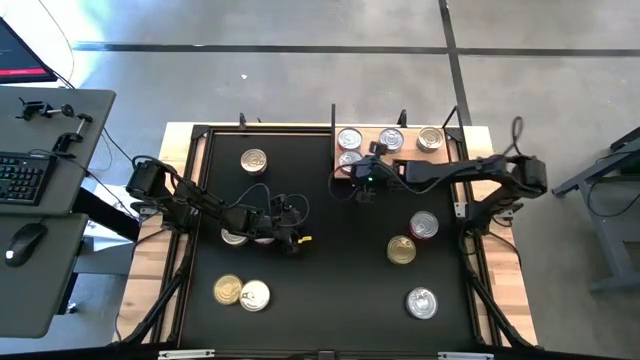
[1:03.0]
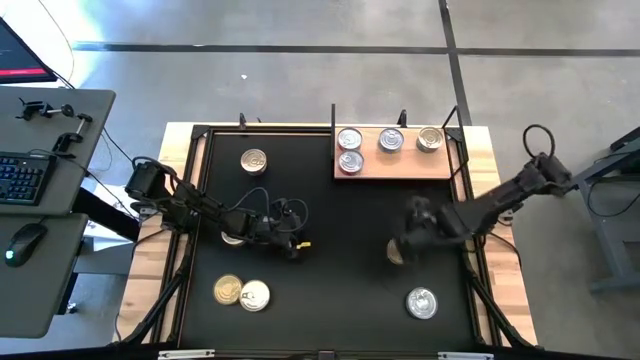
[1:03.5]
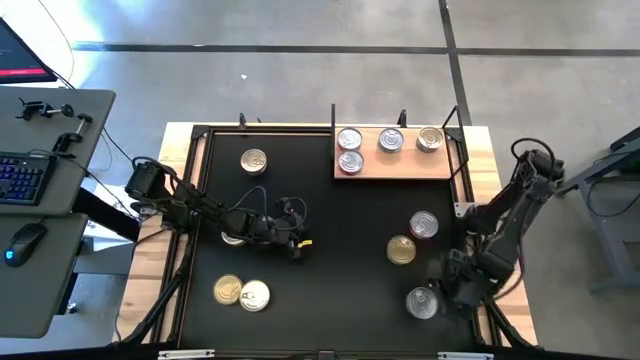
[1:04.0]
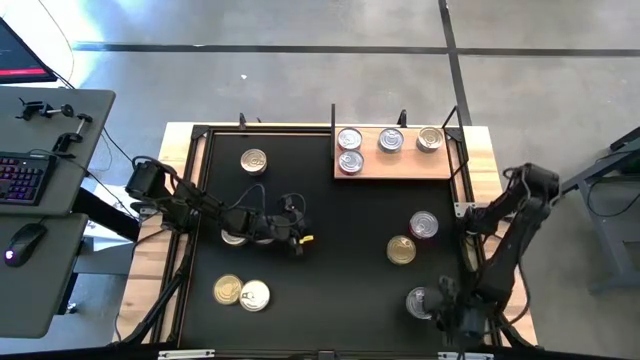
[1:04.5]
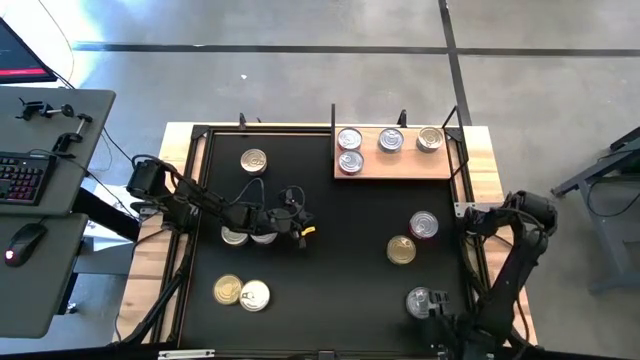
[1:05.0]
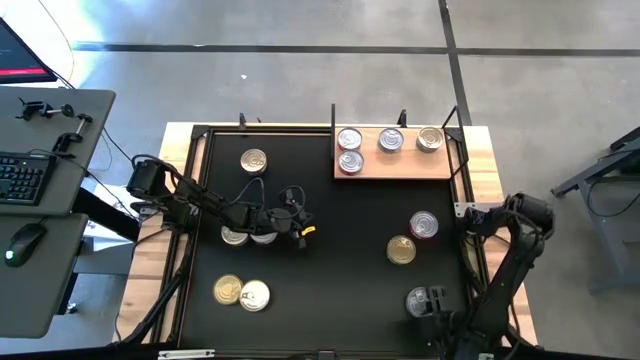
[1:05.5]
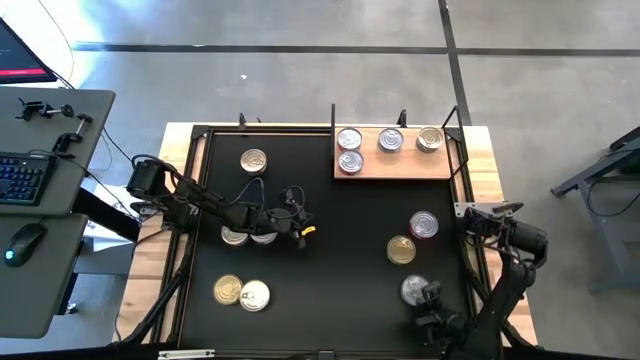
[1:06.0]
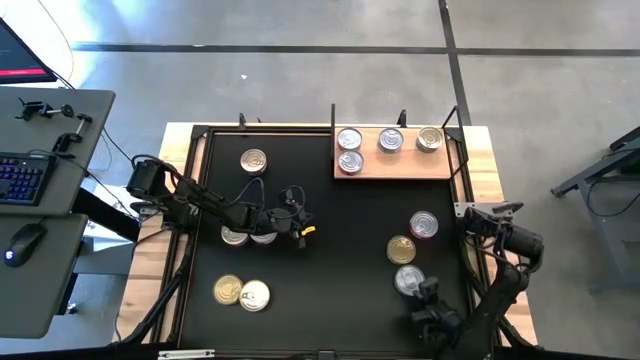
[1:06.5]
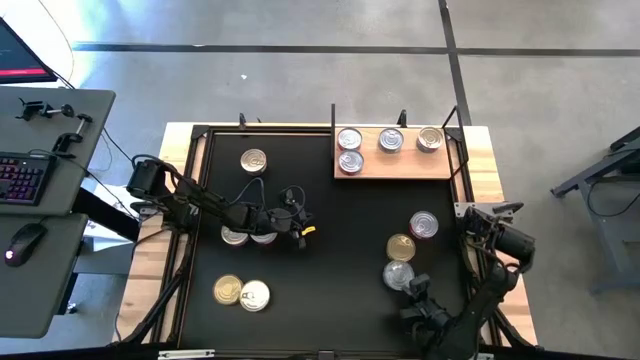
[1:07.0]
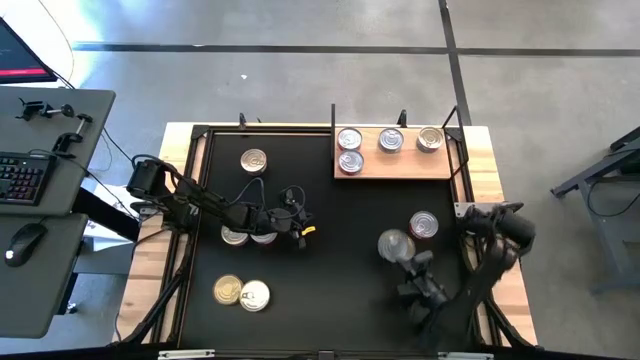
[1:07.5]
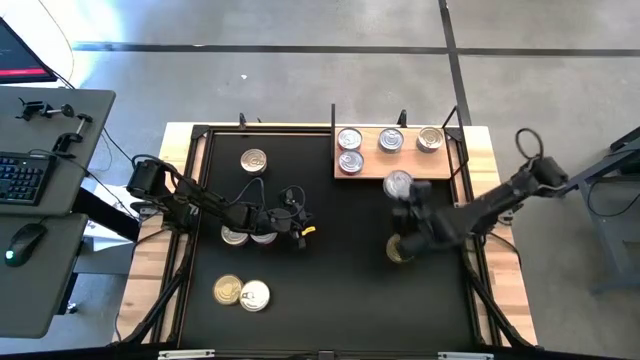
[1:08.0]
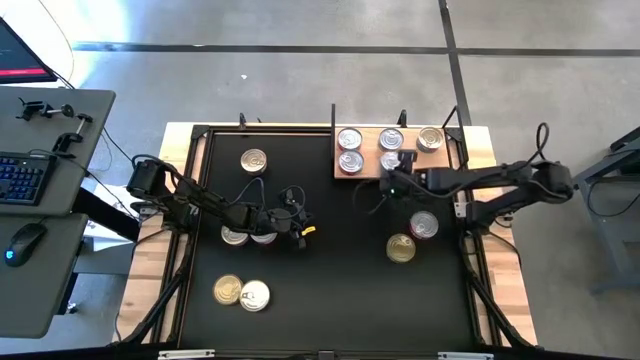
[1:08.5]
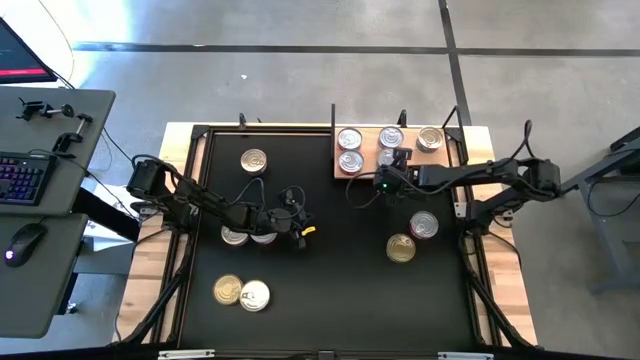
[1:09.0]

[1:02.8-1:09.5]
Task: Stack canned seafood by type on shelf
Put the green tuna can aligned with the other green tuna can

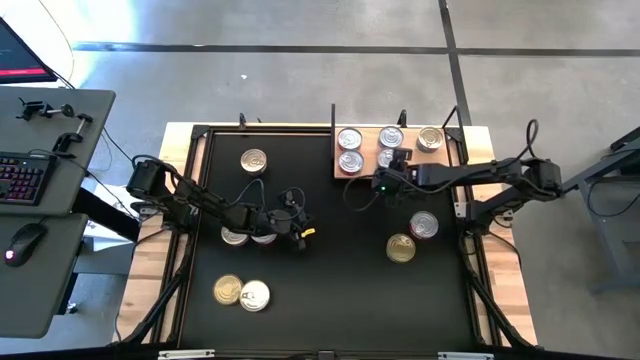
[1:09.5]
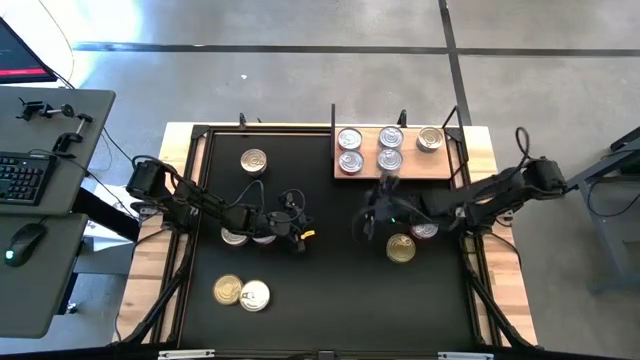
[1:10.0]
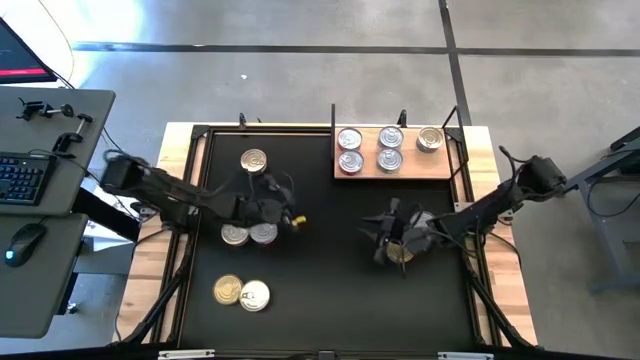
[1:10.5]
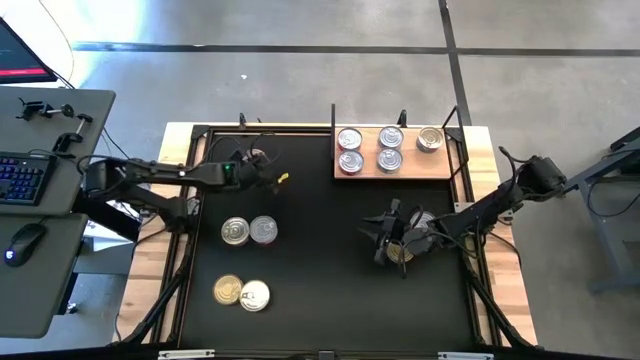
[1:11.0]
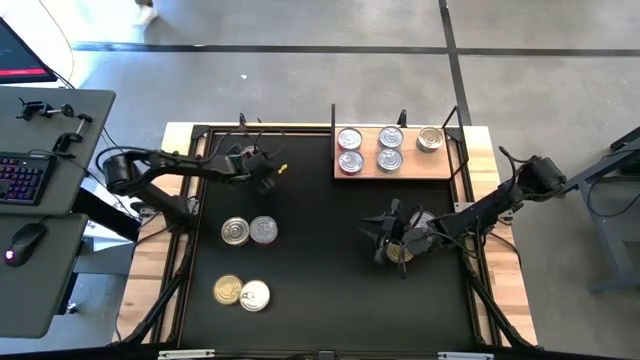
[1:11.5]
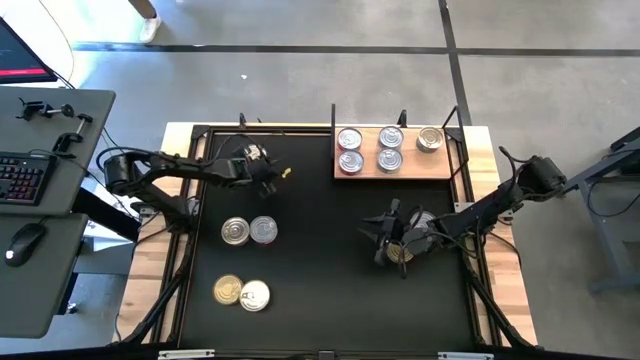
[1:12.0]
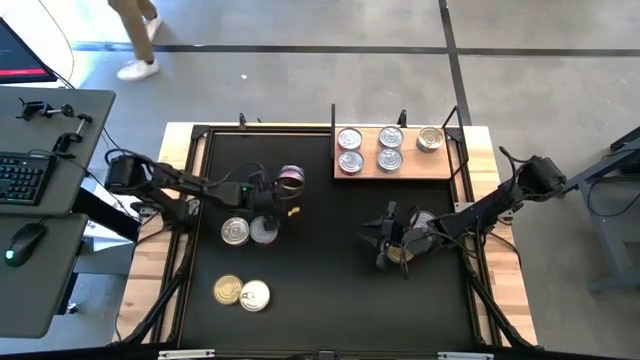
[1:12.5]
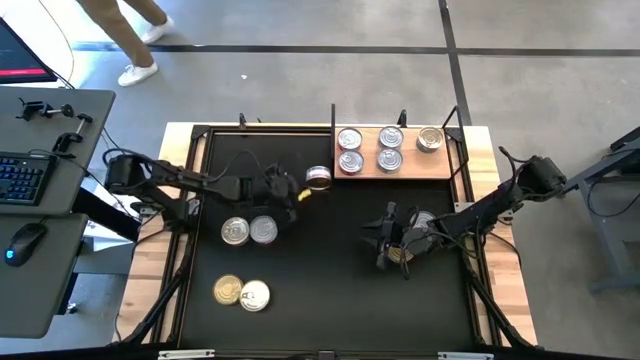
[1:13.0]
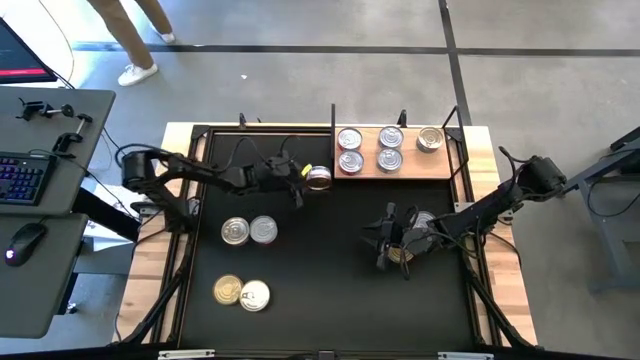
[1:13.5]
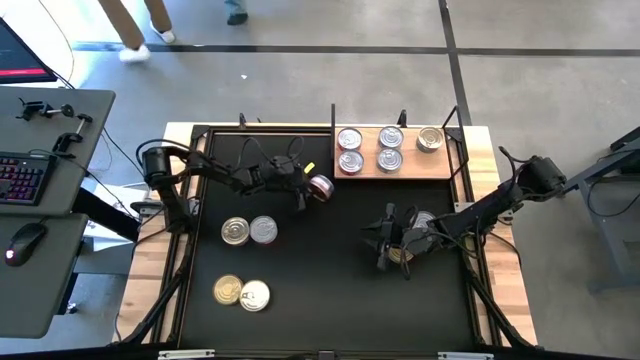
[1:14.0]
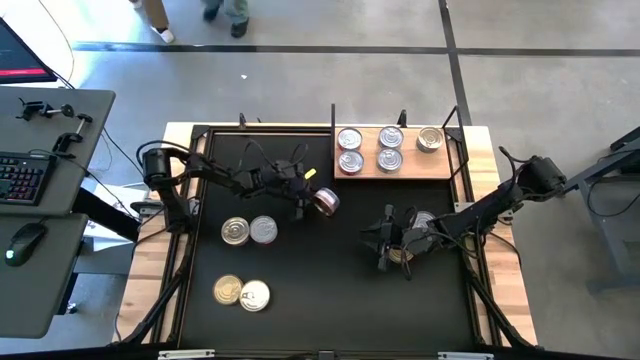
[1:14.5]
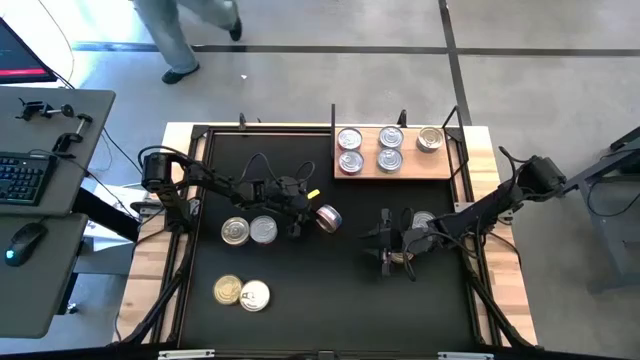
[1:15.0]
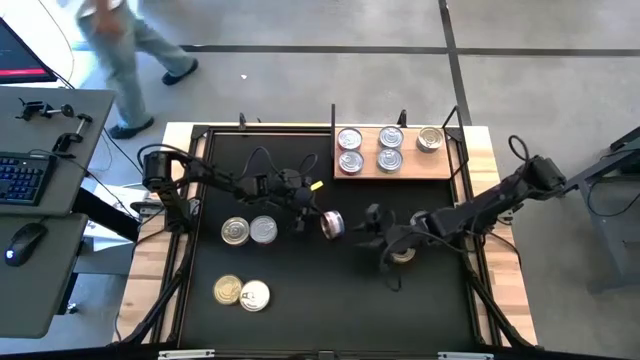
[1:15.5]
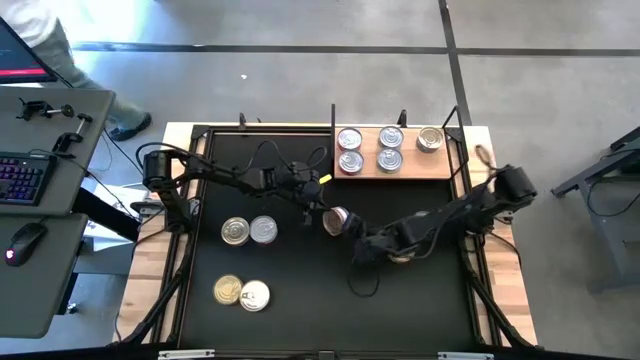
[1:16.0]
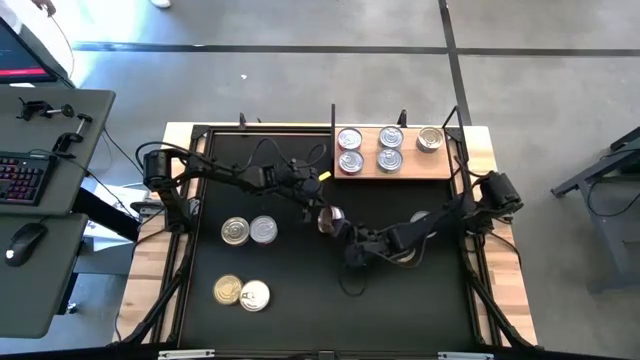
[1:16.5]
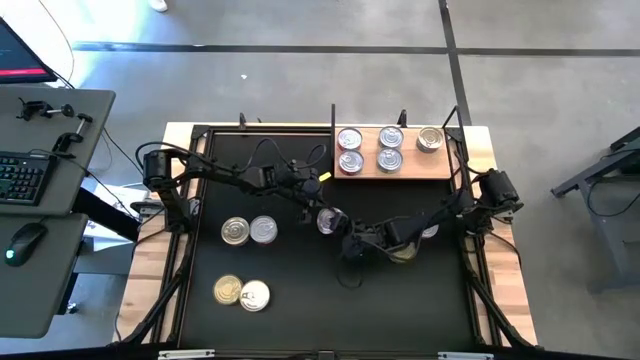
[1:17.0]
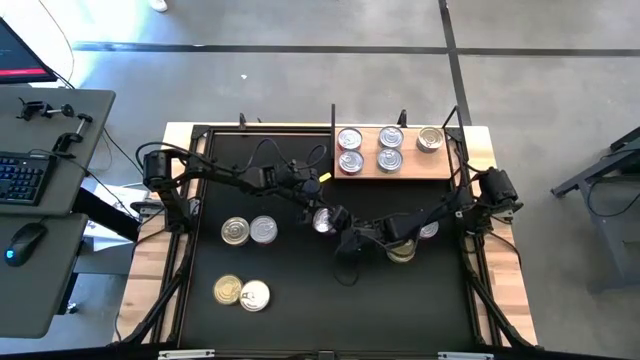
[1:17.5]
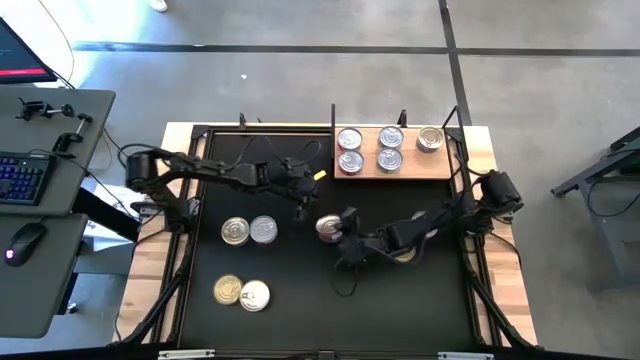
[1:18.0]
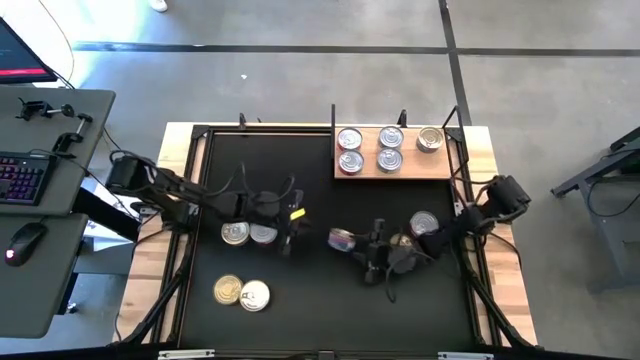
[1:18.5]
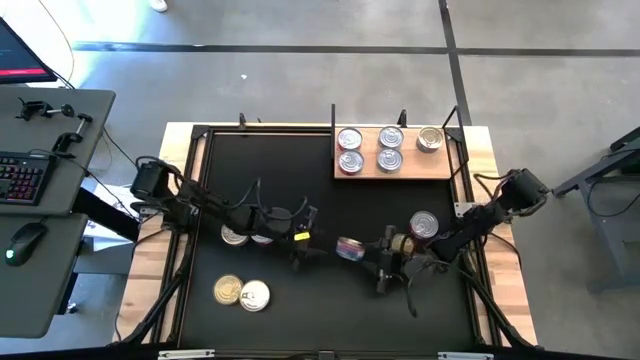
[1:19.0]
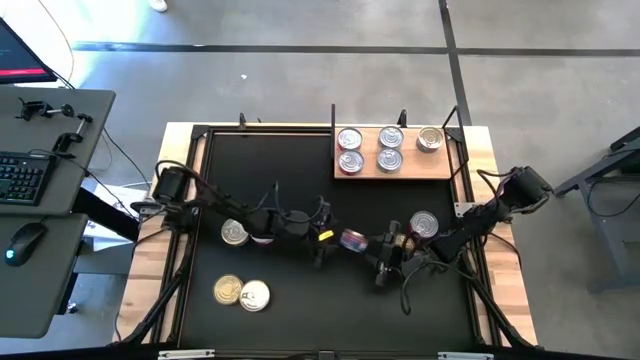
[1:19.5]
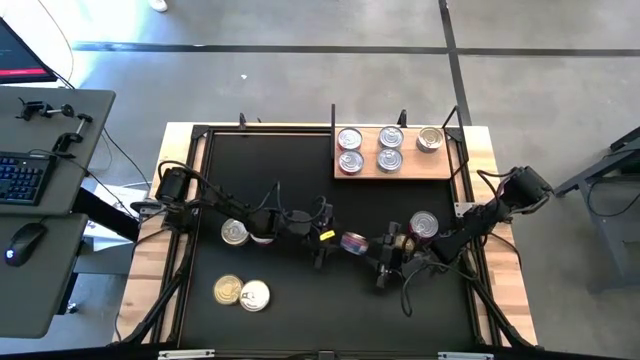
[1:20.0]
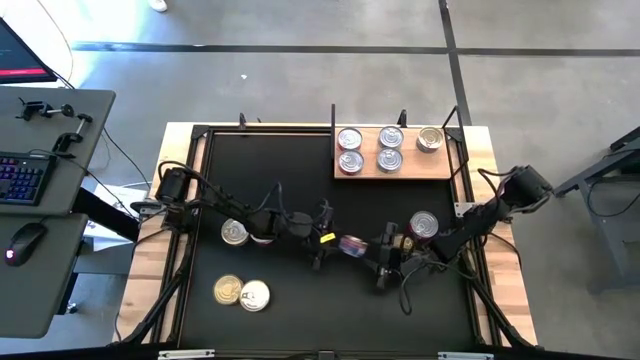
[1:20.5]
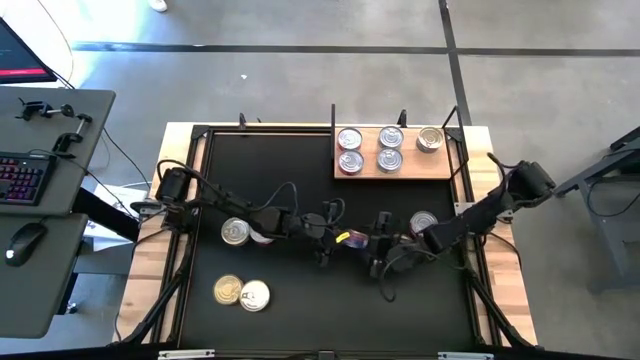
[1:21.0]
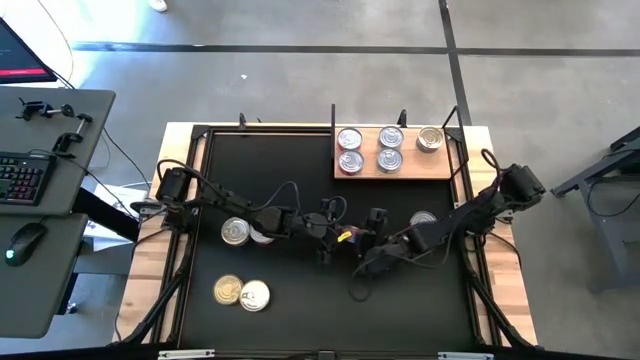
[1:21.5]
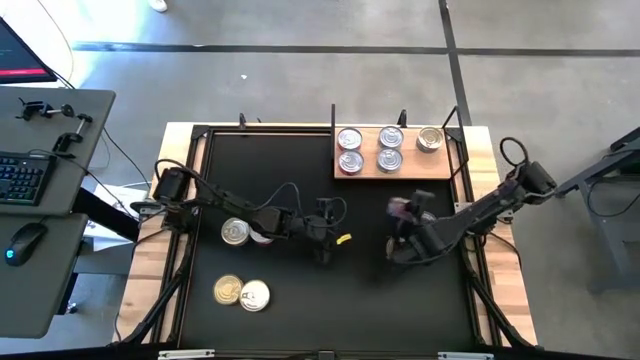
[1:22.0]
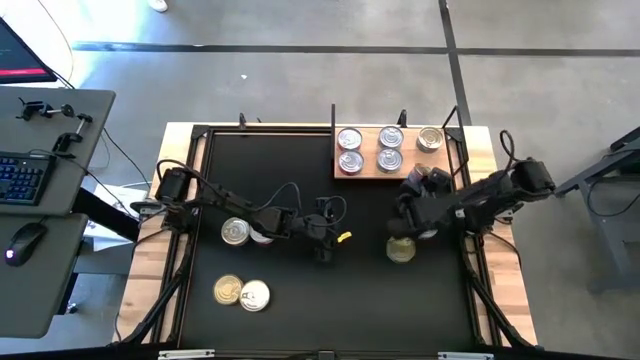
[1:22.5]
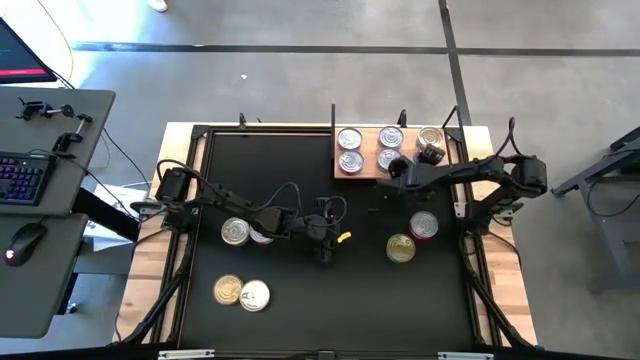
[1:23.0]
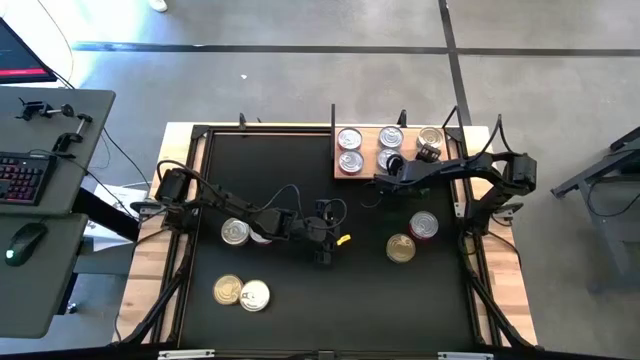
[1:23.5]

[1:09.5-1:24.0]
Put the blue tuna can on the shelf aligned with the other blue tuna can

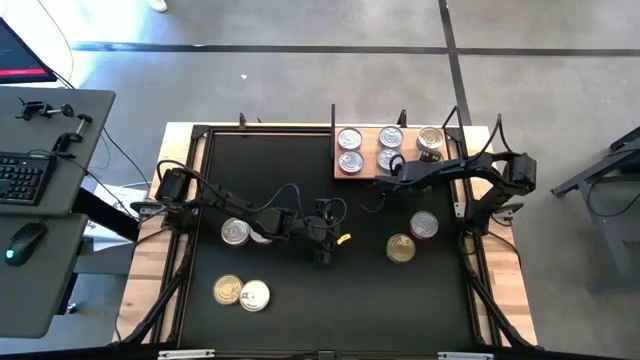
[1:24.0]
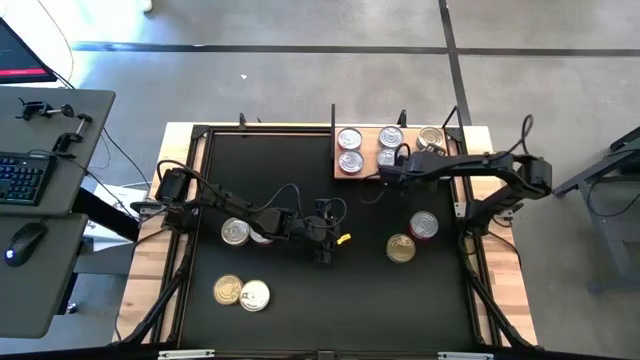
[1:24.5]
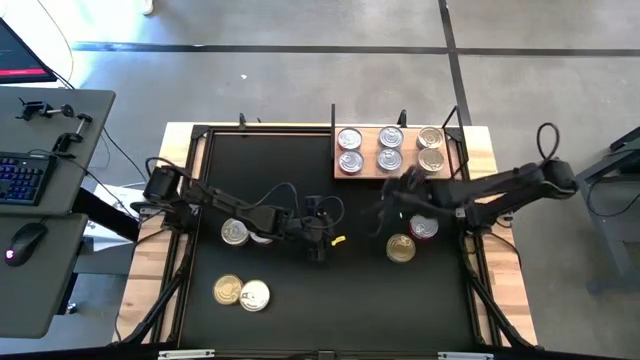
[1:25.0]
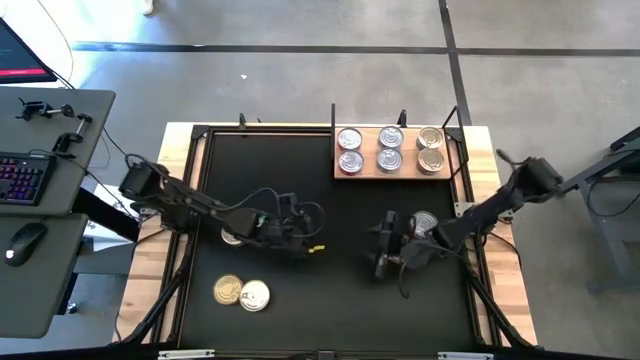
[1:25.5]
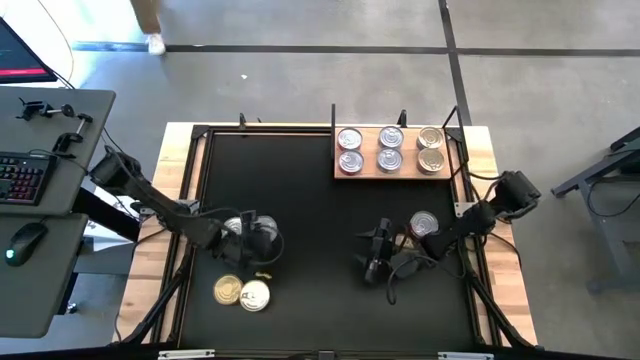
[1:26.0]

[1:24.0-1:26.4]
Stack the red tuna can on top of the upper red tuna can on the shelf
